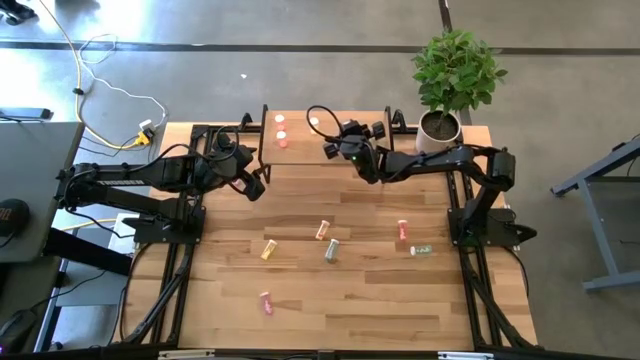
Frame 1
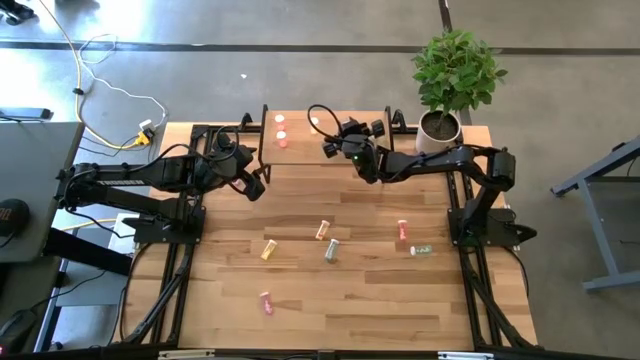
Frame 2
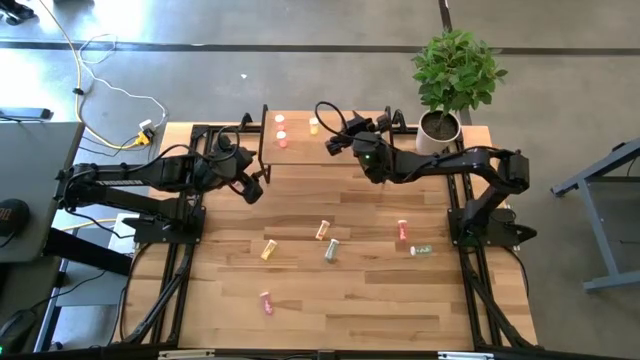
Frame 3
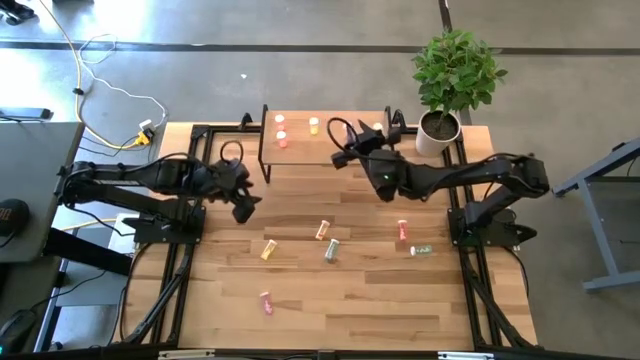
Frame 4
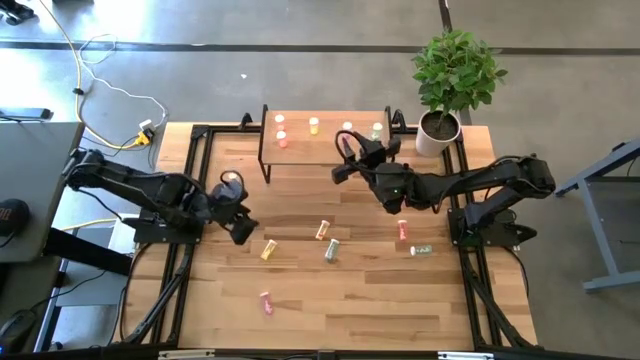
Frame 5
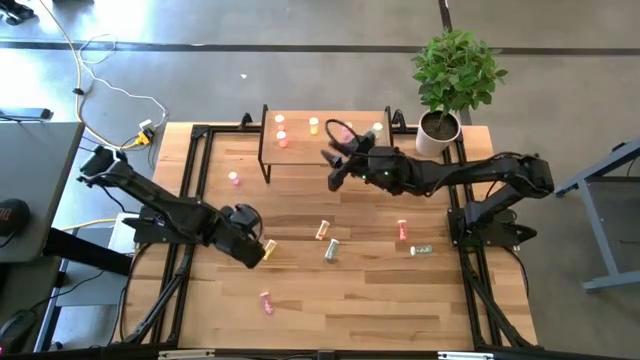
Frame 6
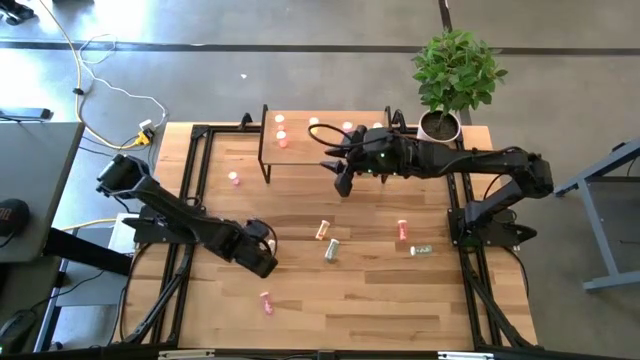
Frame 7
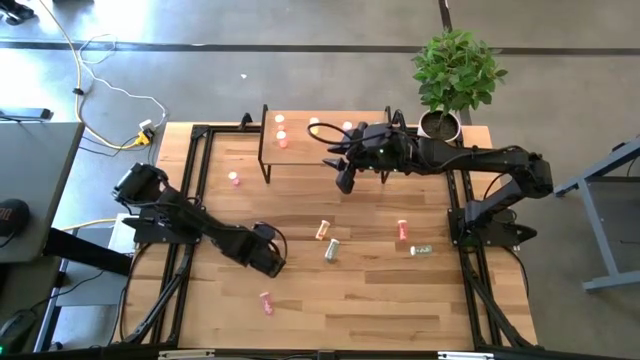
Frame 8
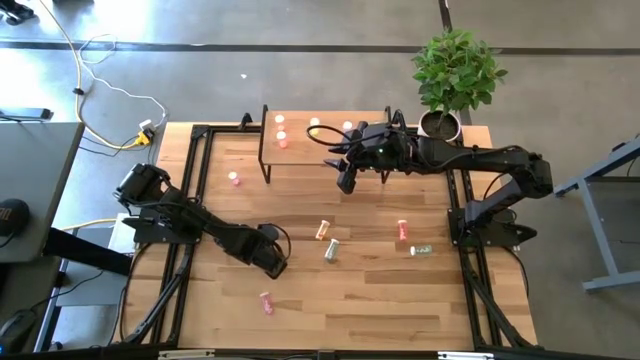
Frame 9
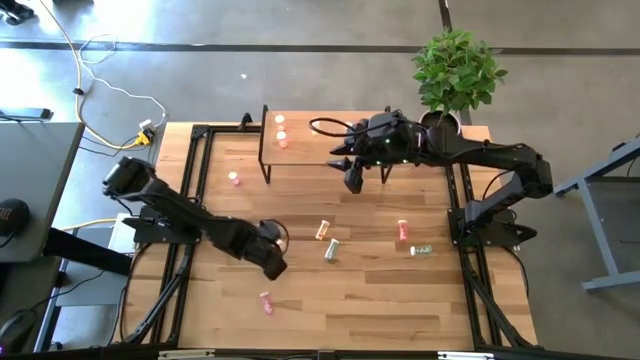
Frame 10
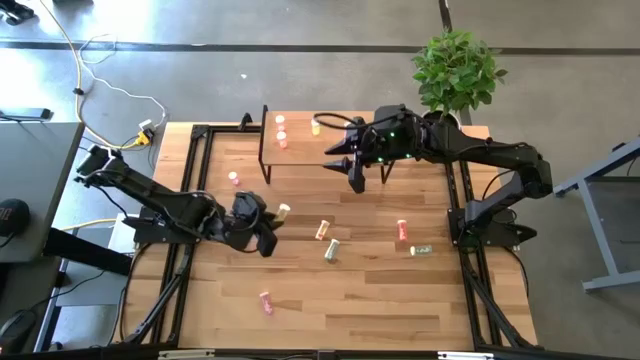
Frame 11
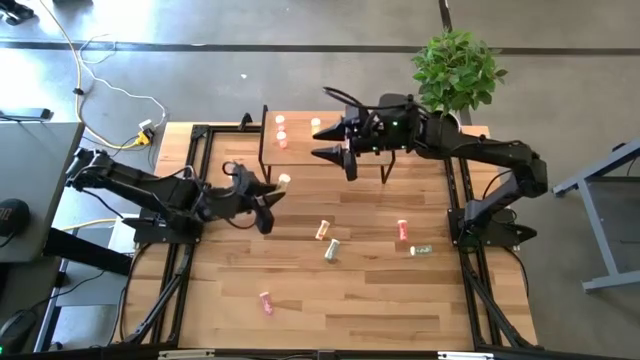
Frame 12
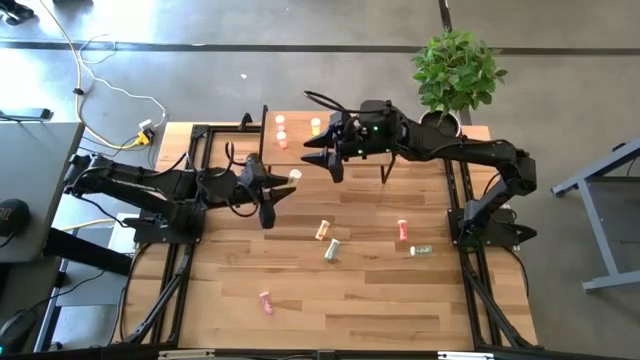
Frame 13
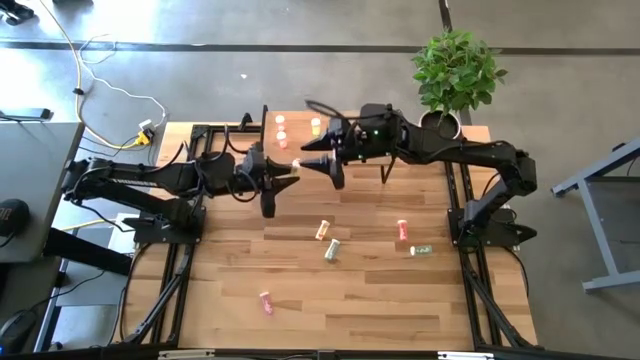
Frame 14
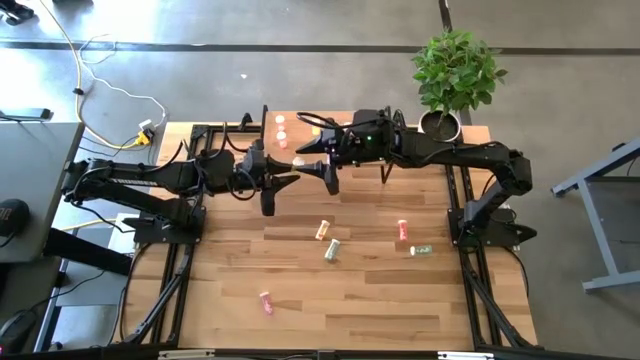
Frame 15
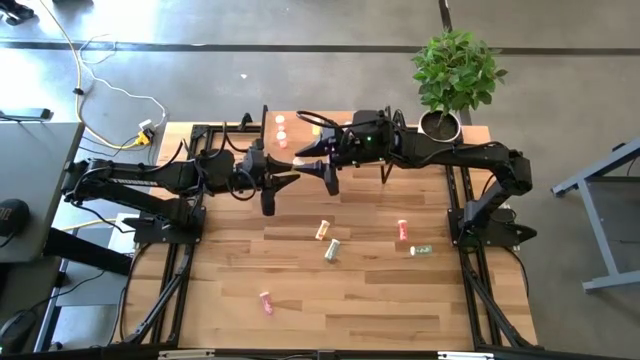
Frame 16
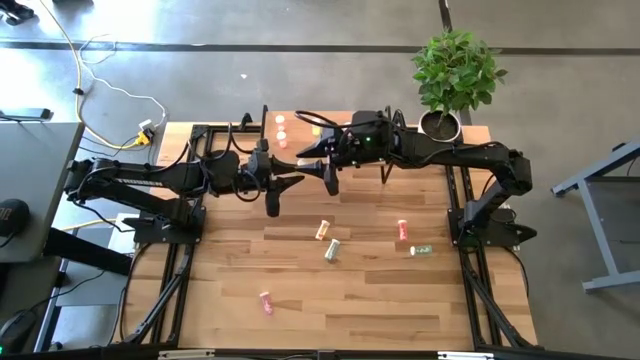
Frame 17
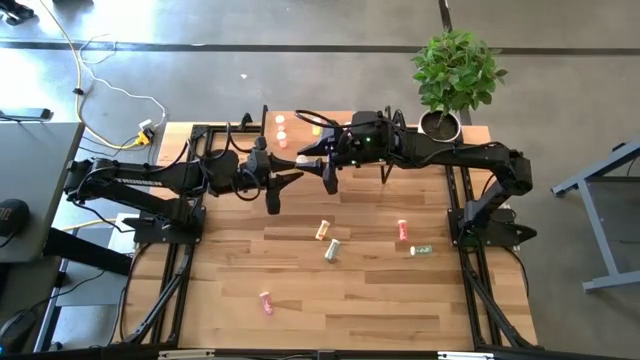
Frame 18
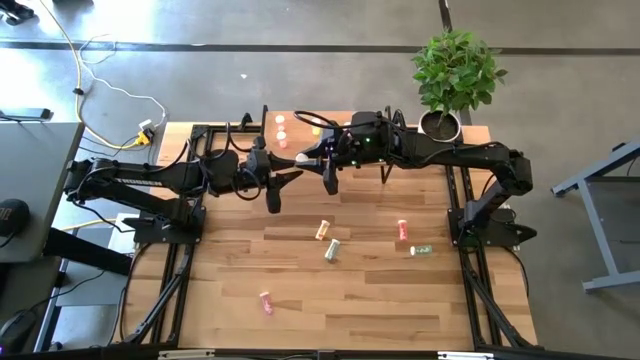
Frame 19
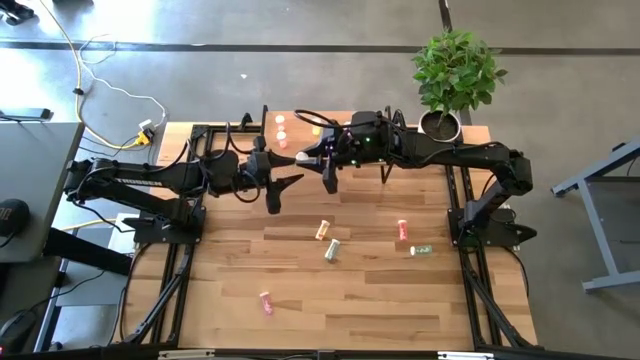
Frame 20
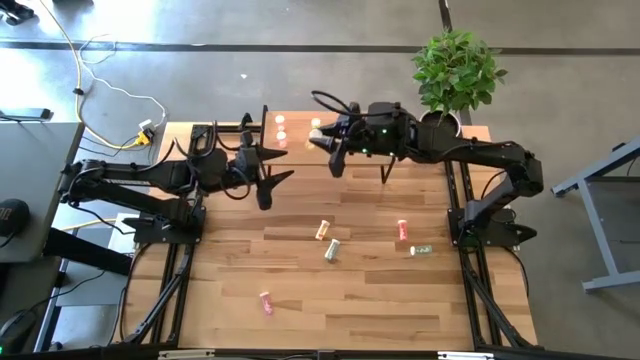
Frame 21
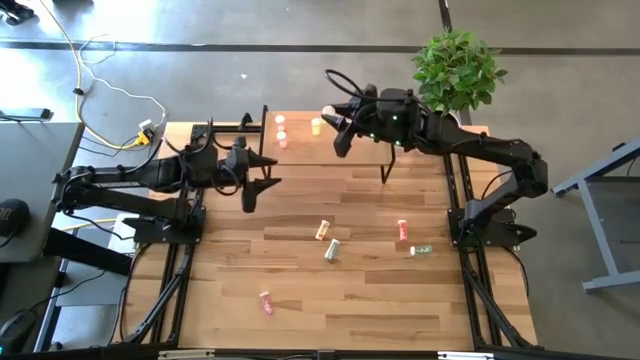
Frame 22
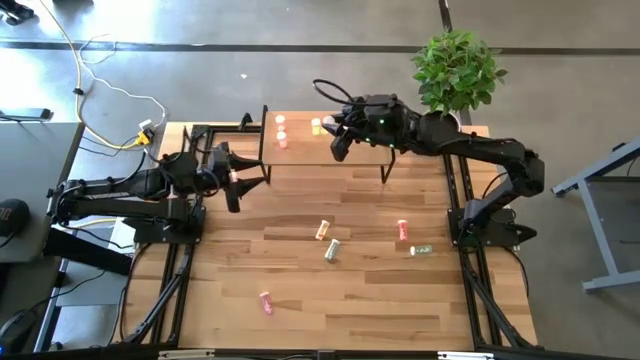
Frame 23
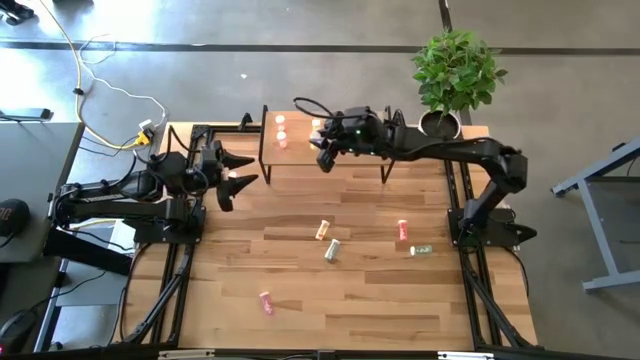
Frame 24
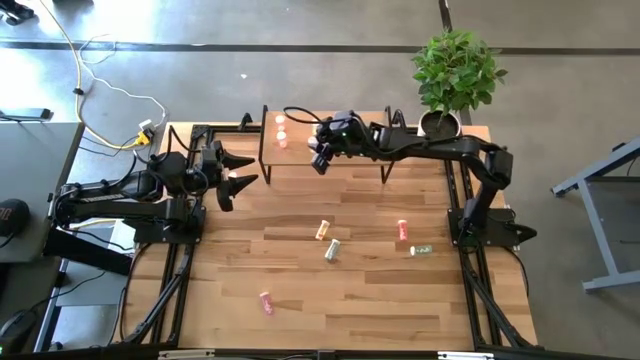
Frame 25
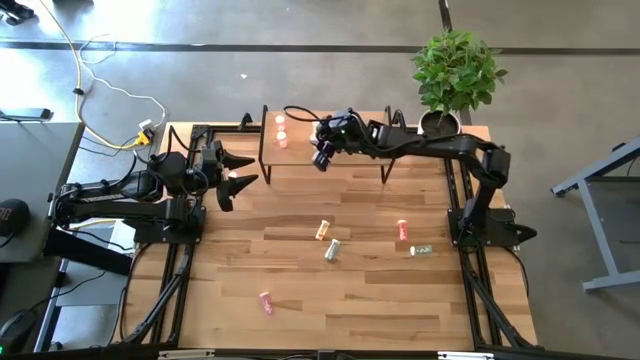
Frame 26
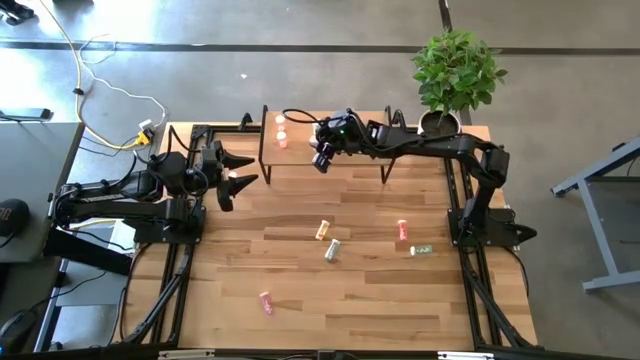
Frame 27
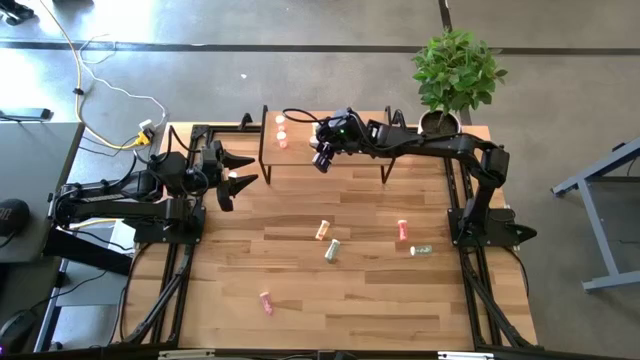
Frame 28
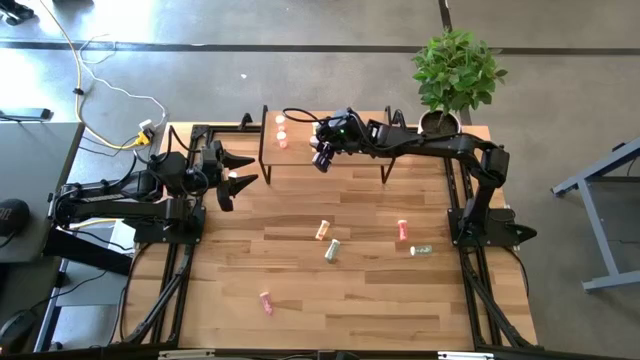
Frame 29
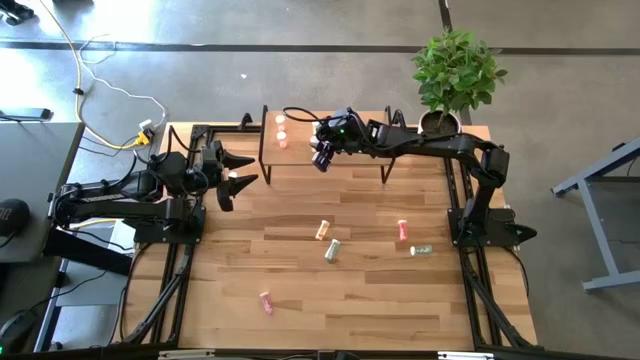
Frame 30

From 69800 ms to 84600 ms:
Task: Pick and place medicine bottles onto shelf by color
Put the bottom yellow pill bottle aligned with the yellow pill bottle on the shelf

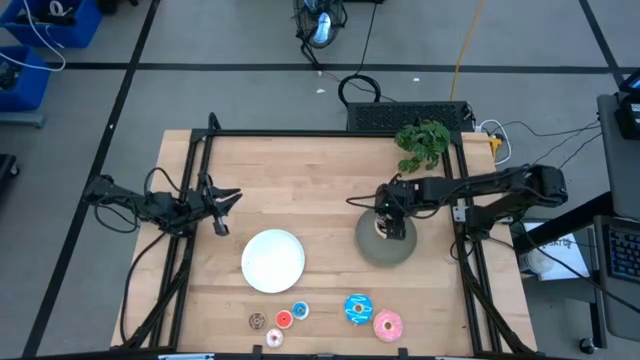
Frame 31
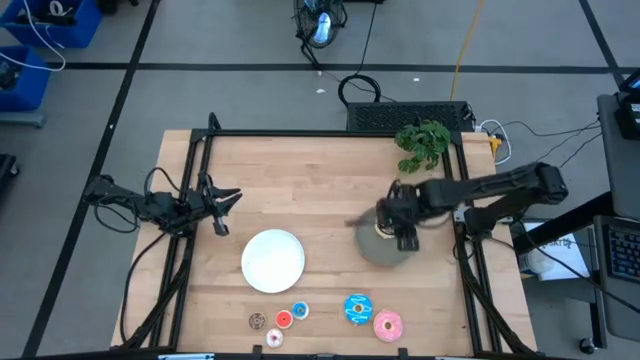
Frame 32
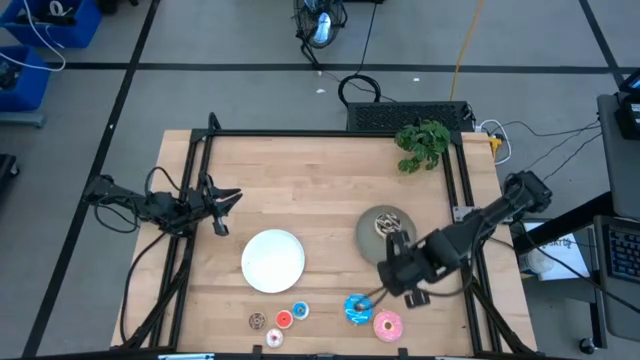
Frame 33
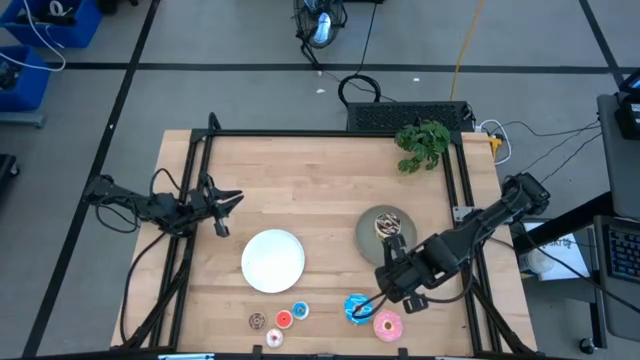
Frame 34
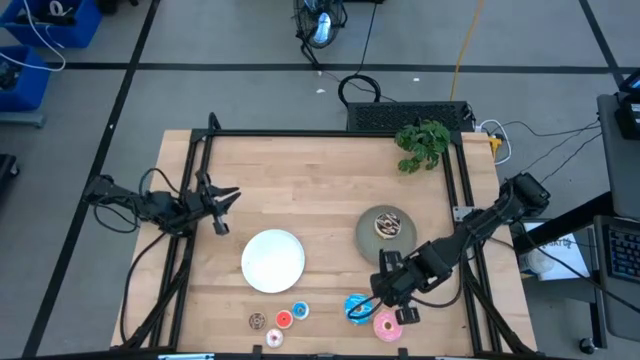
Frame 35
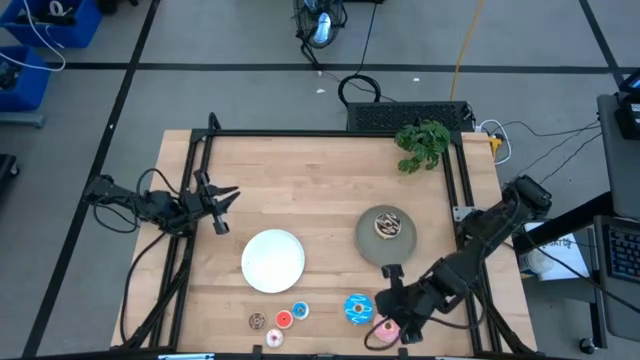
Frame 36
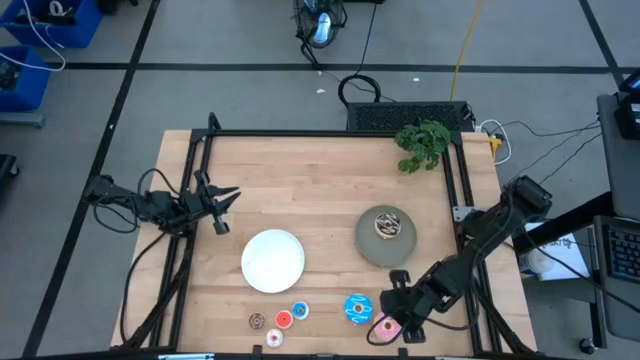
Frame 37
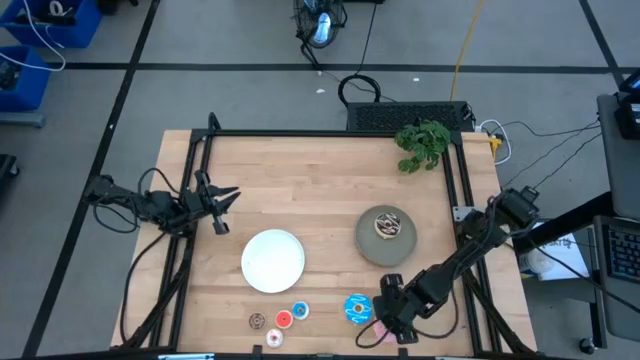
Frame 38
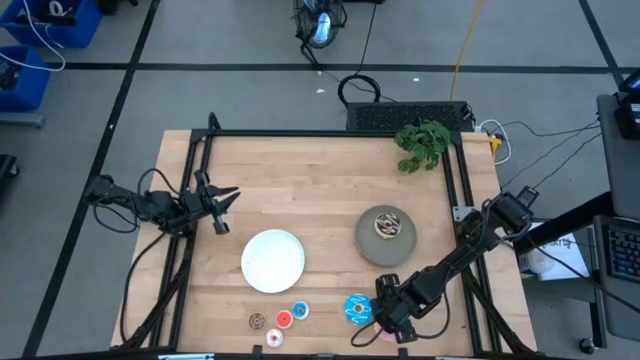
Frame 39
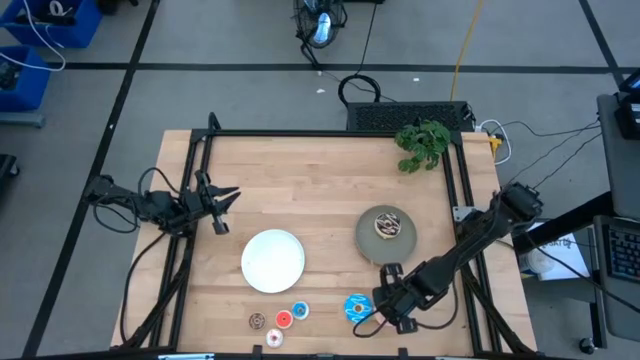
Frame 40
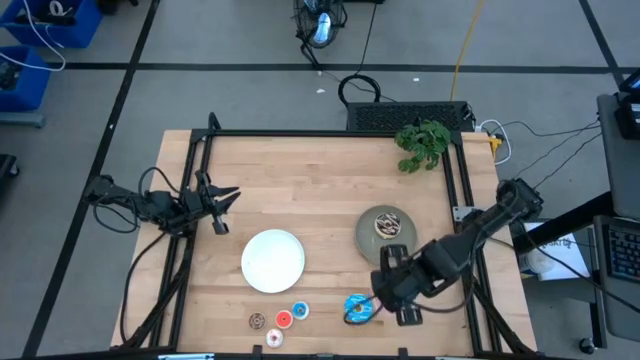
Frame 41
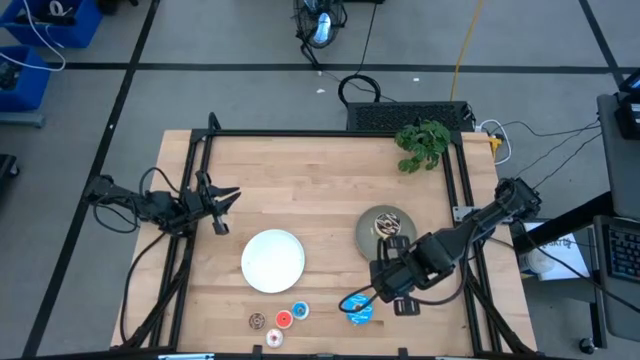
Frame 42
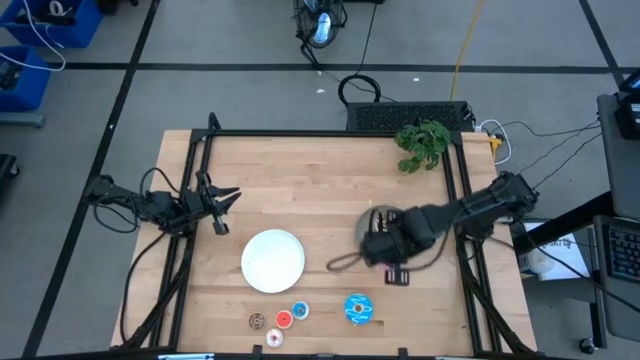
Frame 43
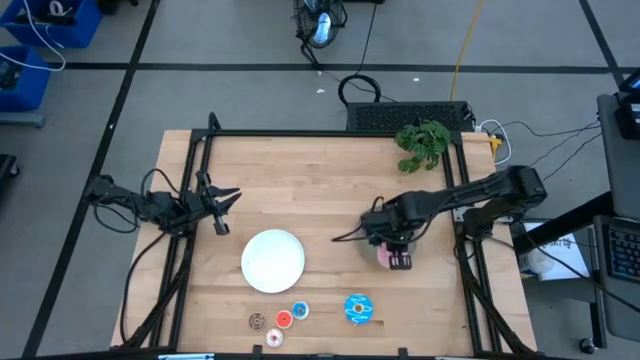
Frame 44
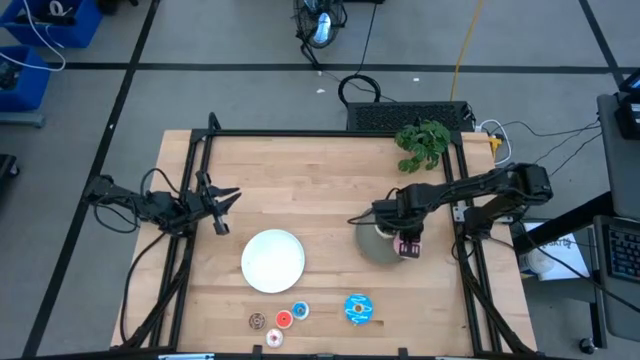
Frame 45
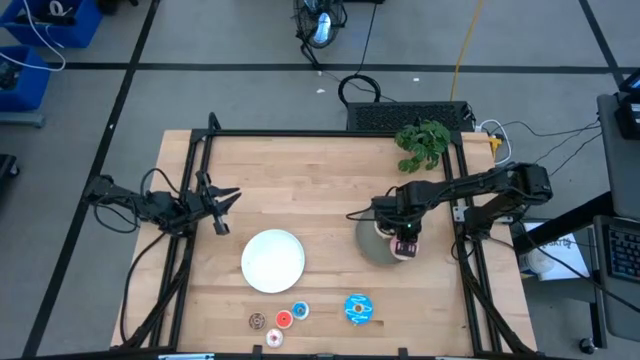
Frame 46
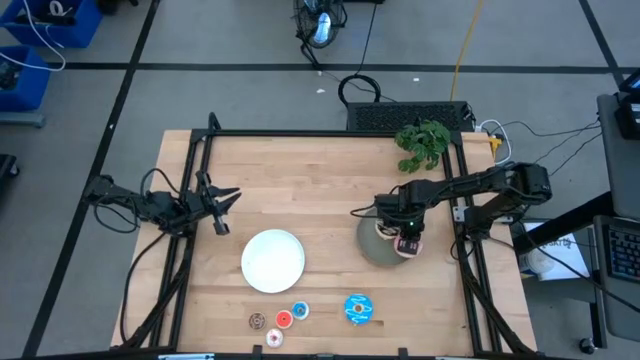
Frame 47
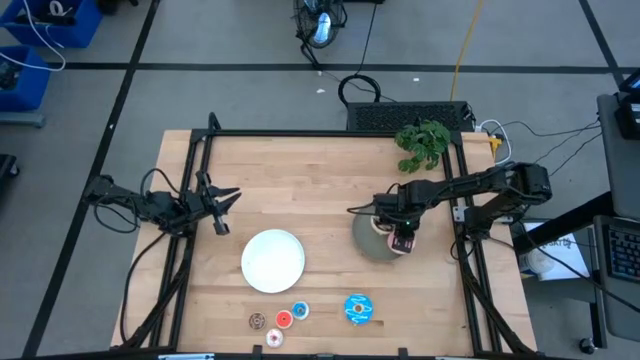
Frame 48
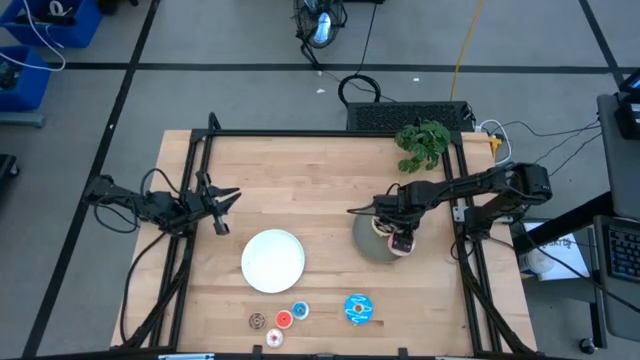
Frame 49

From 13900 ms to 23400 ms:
Task: Pick & Place donuts
Put the pink donut on the gray plate
